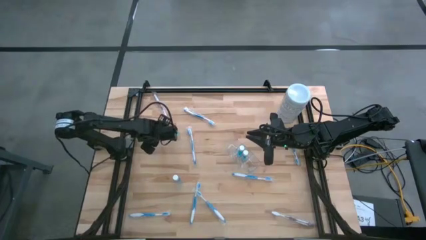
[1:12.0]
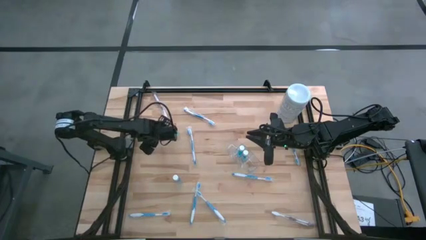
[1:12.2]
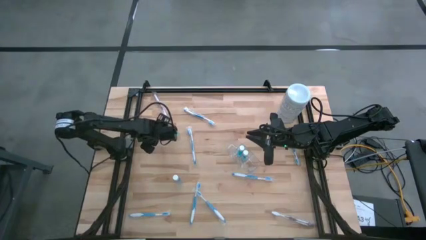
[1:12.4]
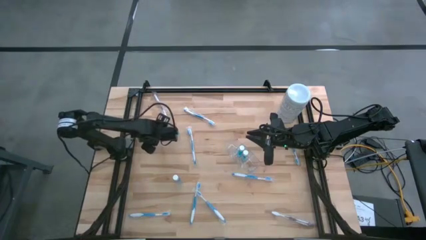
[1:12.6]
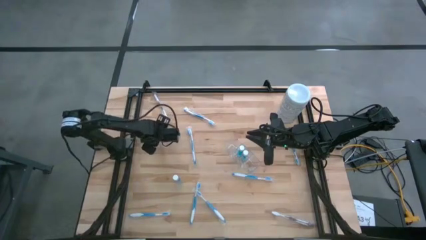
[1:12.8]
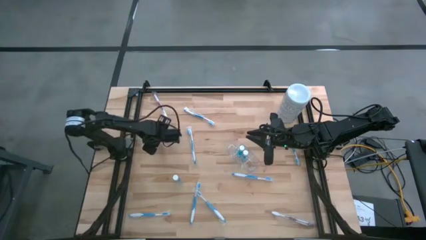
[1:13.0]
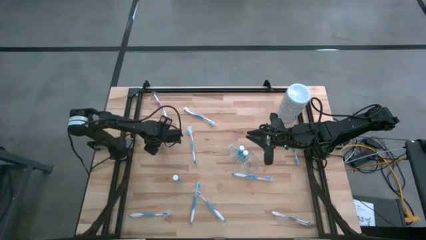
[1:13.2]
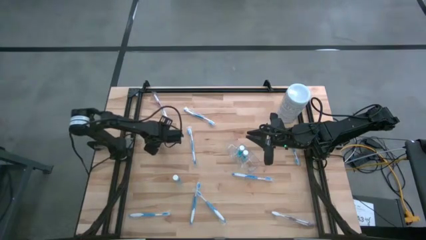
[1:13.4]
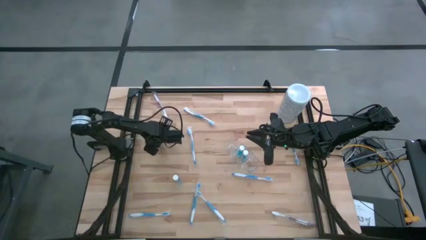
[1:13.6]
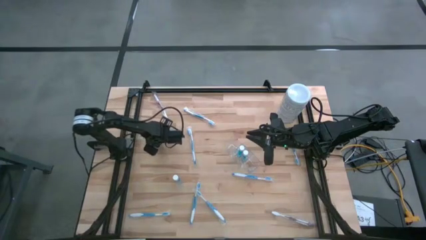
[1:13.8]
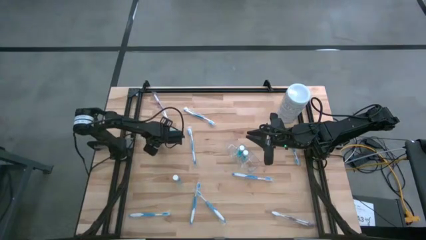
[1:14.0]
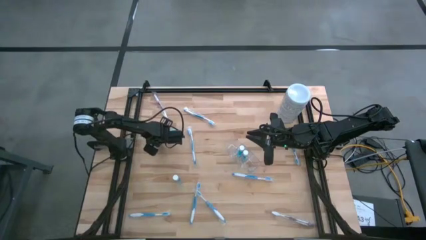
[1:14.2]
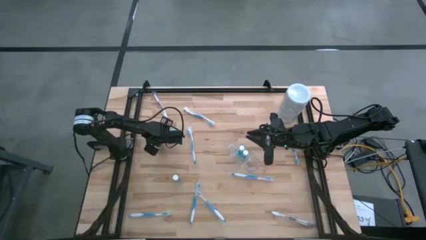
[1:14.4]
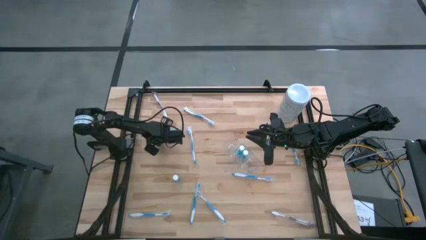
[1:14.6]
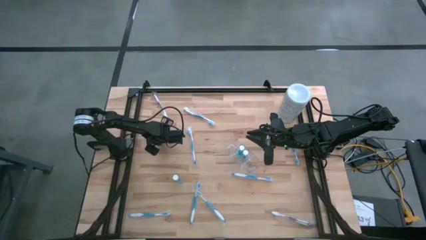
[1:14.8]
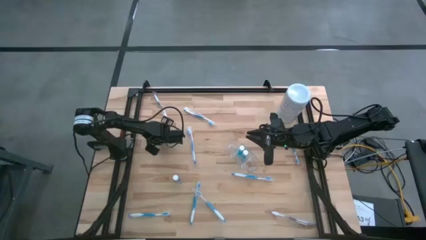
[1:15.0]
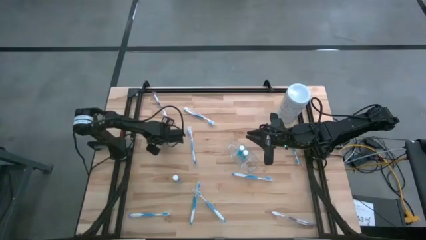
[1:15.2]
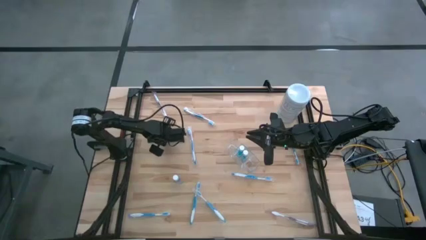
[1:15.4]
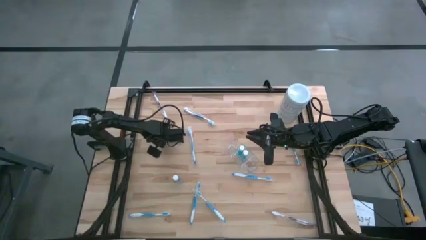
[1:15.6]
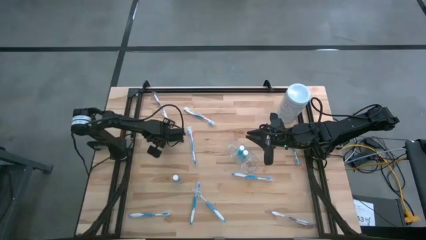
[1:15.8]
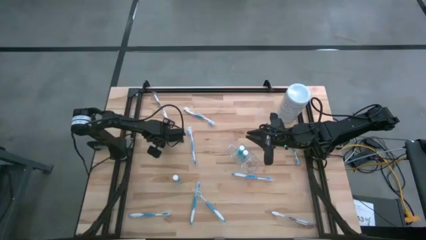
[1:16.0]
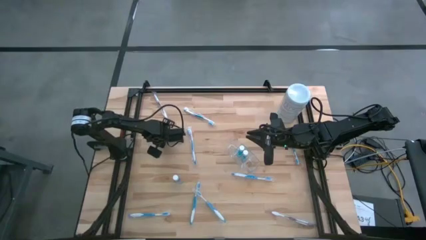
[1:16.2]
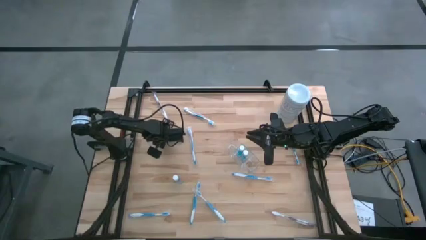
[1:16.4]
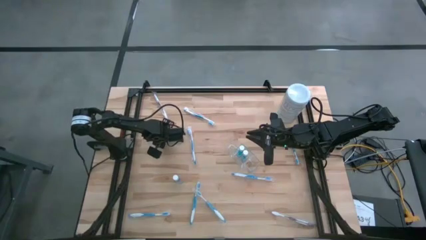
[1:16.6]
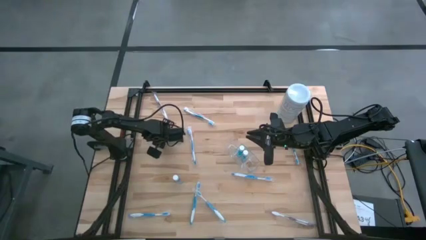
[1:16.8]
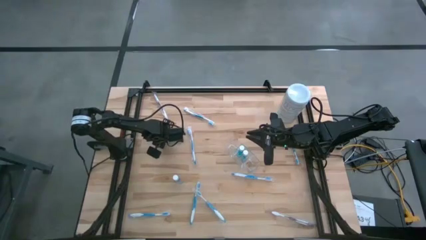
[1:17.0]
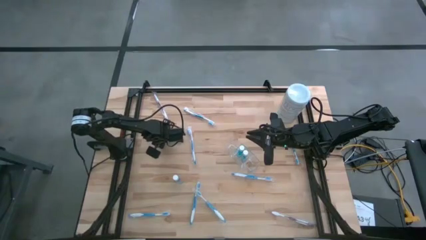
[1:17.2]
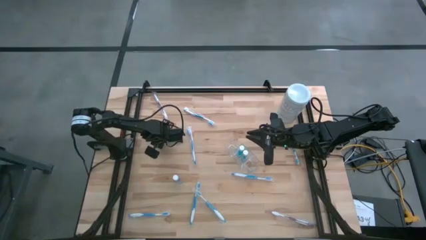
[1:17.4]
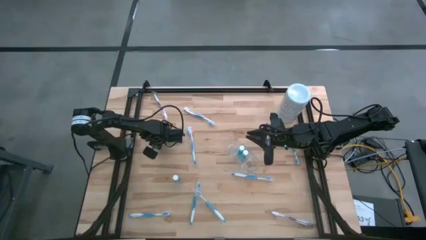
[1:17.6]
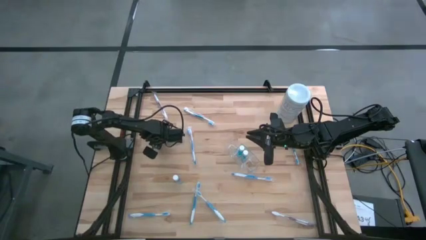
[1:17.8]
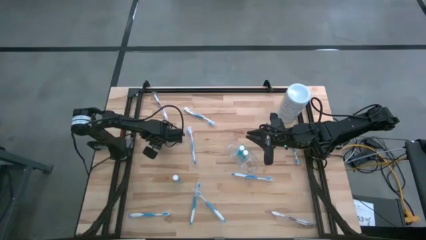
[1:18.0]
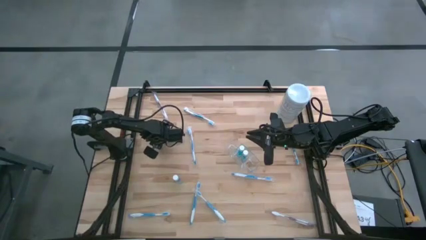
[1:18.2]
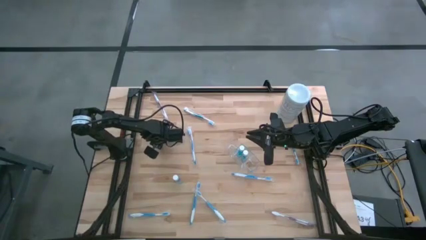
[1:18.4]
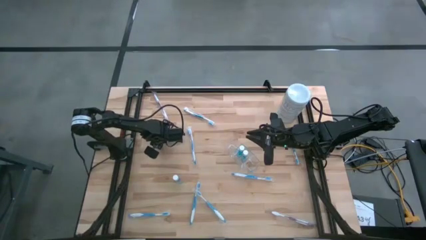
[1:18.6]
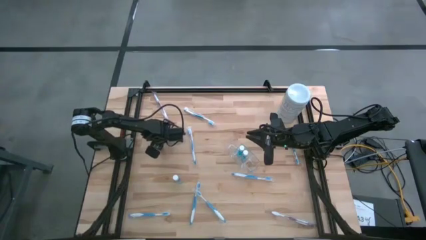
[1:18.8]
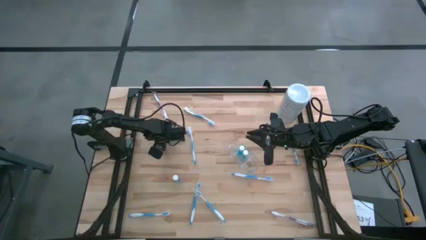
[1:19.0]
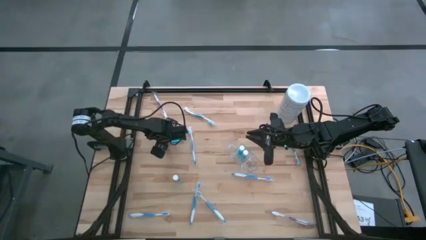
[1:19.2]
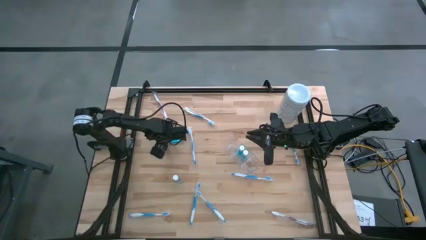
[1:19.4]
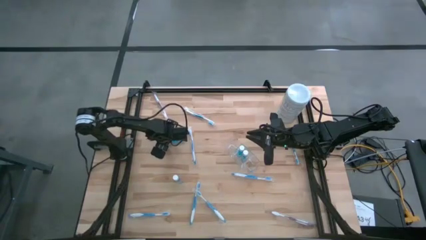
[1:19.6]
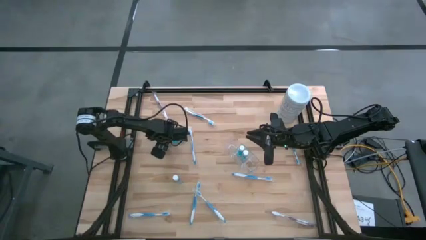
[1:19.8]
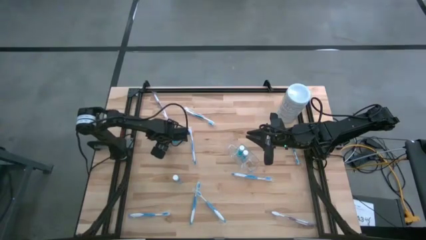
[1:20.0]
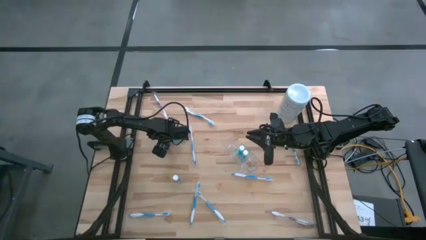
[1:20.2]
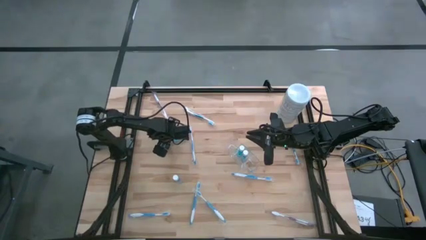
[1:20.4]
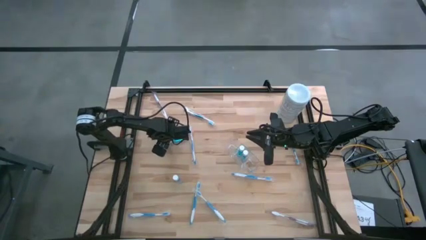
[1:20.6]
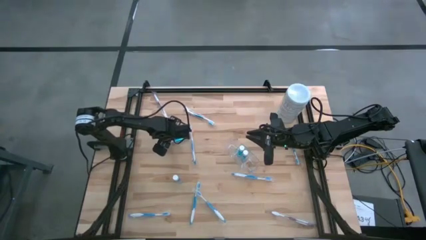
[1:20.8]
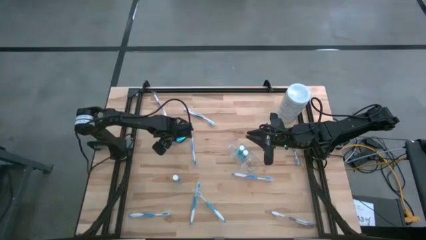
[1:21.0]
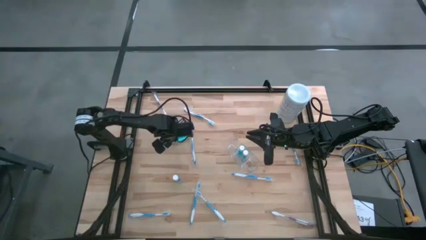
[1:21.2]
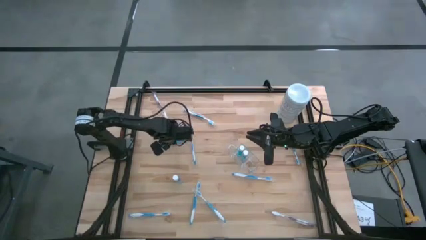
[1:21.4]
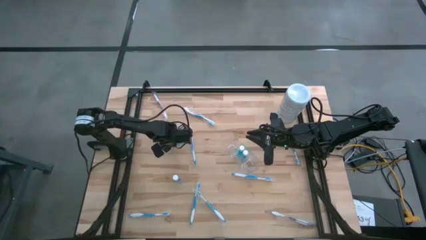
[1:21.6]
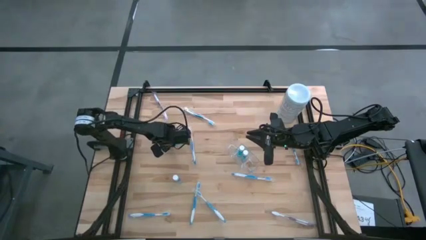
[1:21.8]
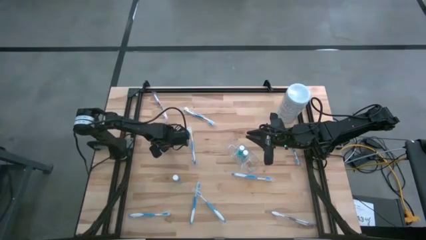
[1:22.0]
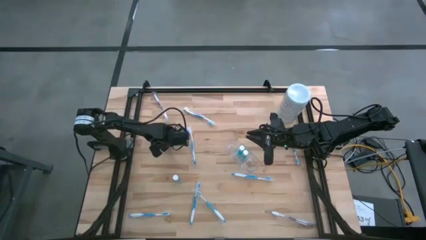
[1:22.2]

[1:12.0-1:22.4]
Task: Pick & Place toothbrushing station
Put the blue mouthwash into the middle section of the transparent organizer
